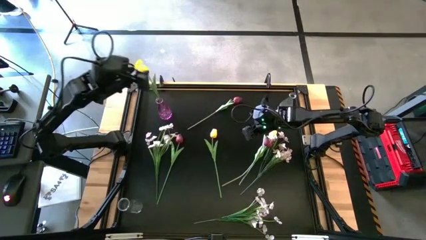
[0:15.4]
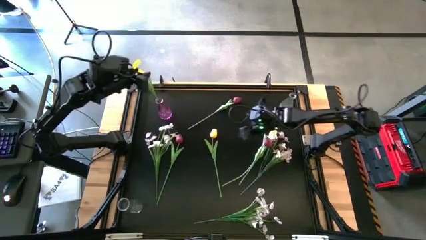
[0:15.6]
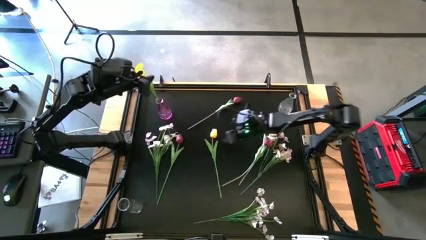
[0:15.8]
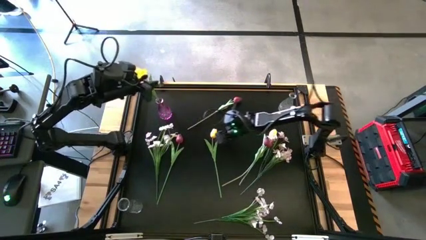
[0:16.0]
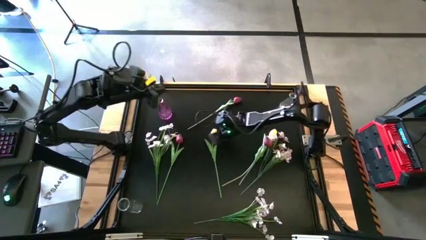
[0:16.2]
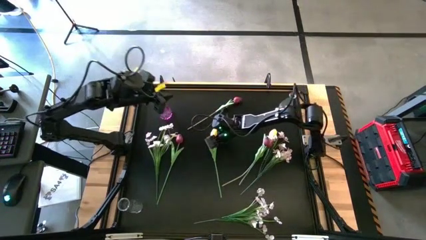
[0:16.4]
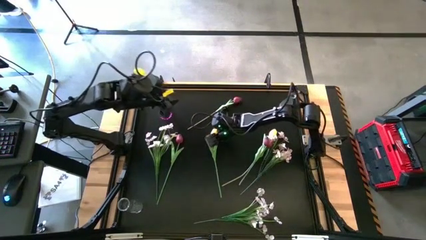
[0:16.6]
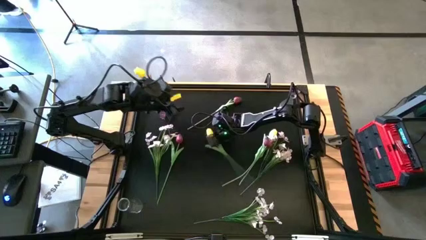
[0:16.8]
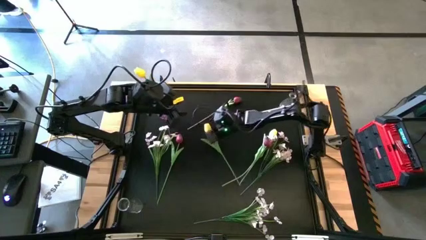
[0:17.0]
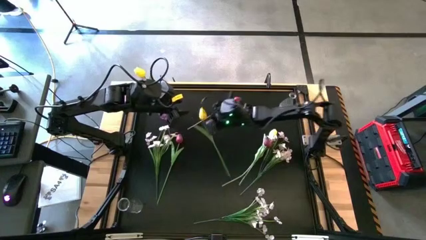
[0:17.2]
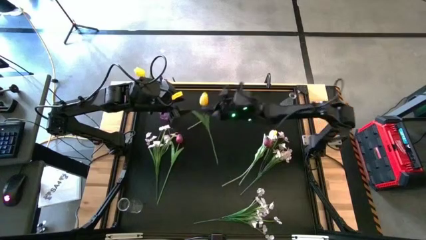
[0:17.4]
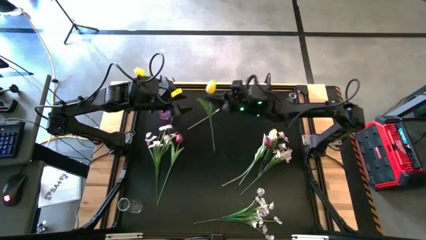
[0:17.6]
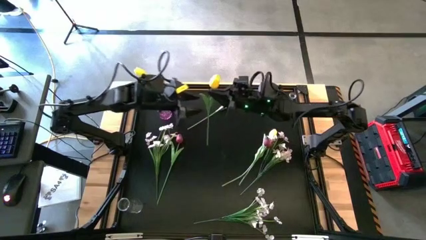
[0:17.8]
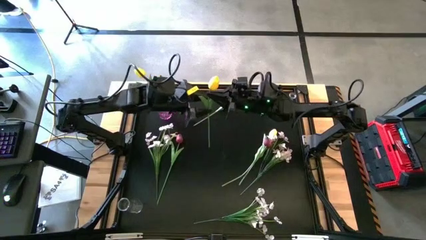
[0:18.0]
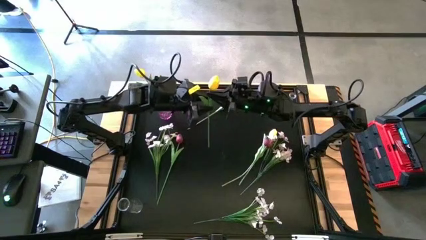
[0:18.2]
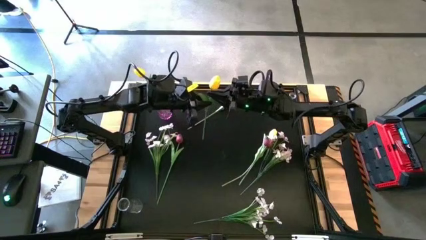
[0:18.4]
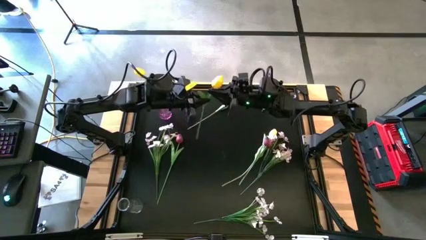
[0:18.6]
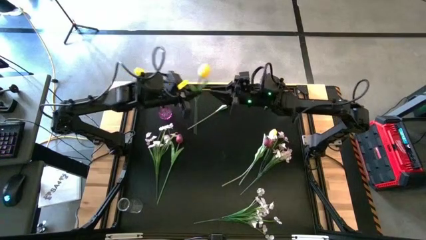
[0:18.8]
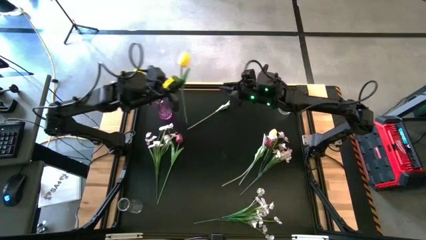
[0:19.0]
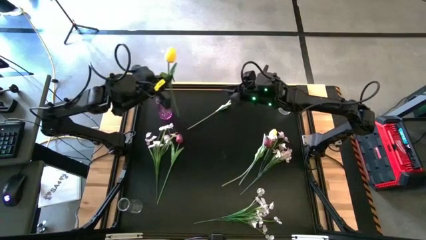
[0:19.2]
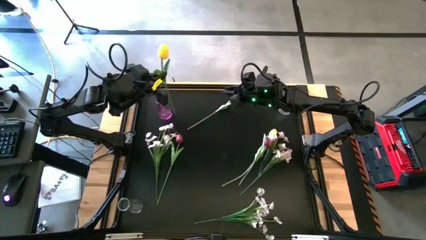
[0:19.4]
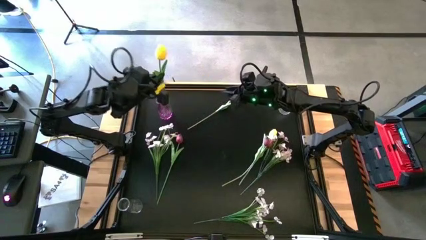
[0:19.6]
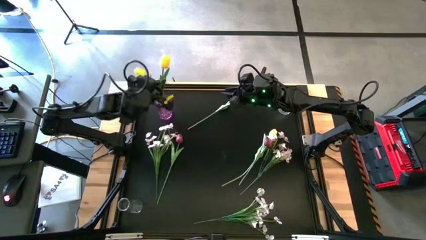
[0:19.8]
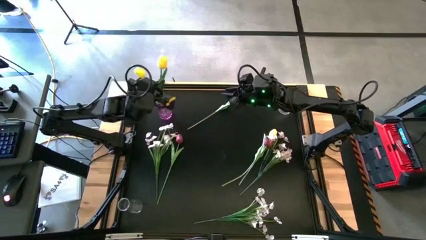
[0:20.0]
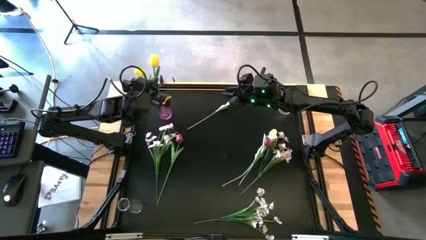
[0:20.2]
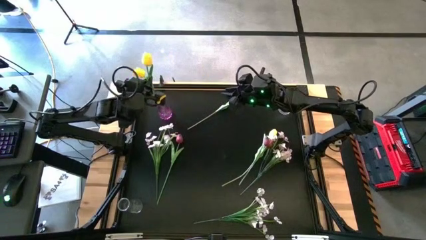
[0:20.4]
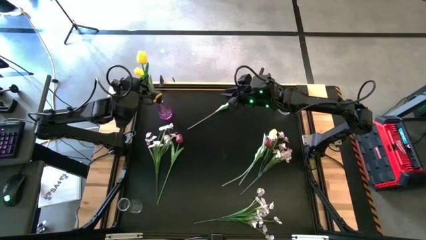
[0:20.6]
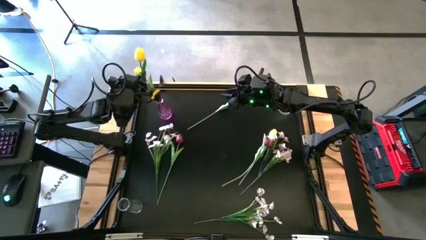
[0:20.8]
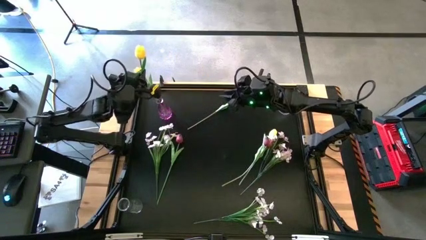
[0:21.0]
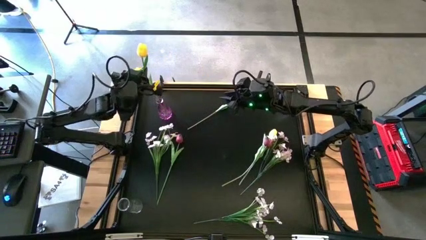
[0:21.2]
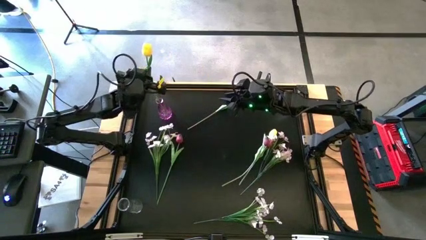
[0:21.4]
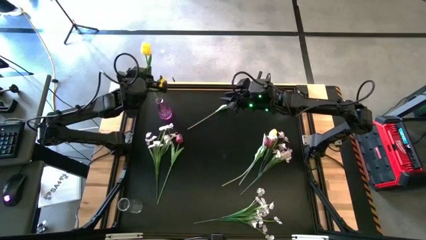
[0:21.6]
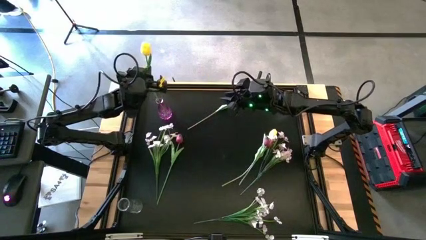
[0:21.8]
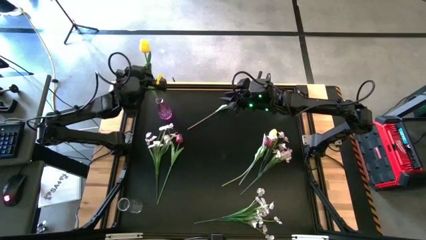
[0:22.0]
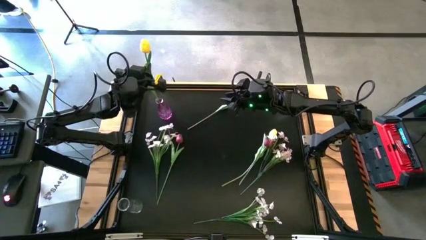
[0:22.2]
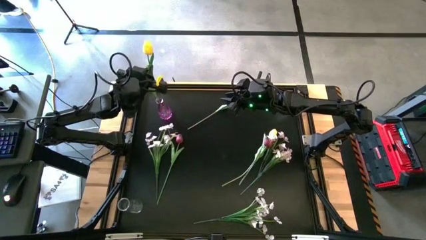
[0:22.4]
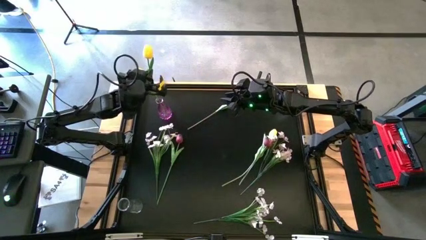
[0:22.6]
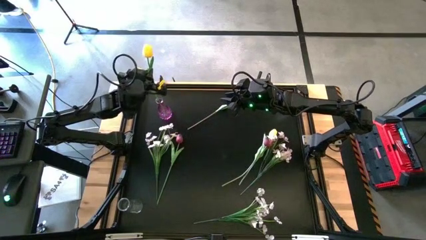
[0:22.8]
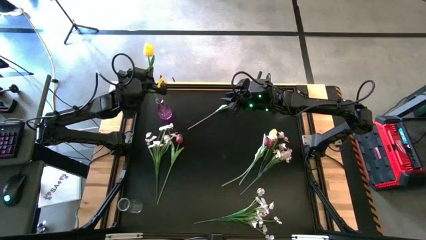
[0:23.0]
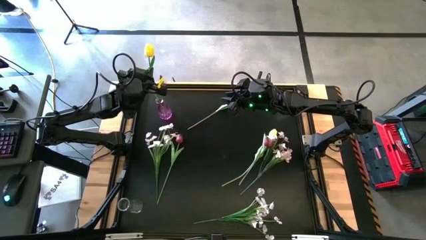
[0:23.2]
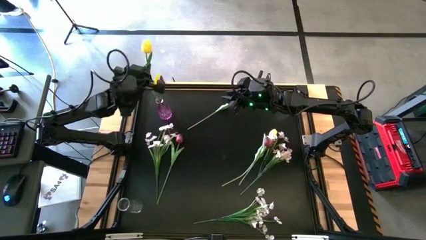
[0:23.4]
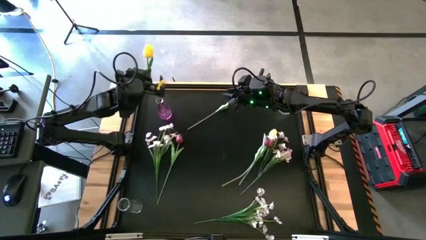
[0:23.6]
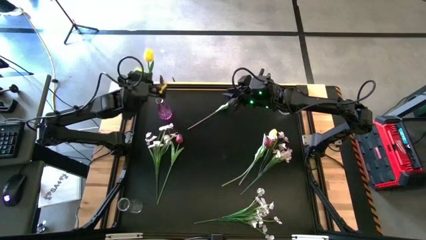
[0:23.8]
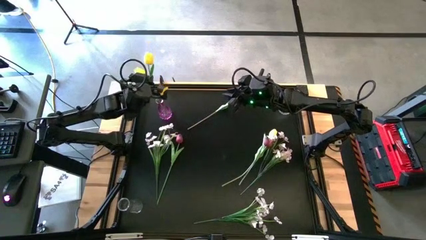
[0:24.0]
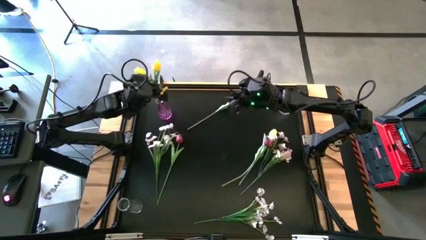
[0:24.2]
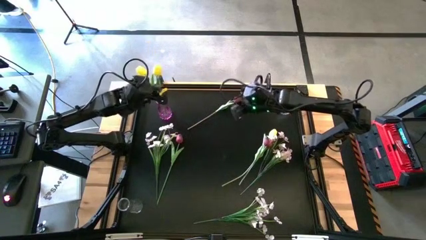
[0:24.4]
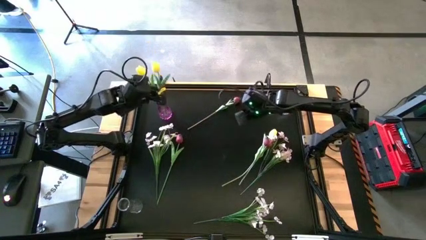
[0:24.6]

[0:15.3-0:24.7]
Task: Sort flowers into vase by color
Put the left yellow flower into the violet vase

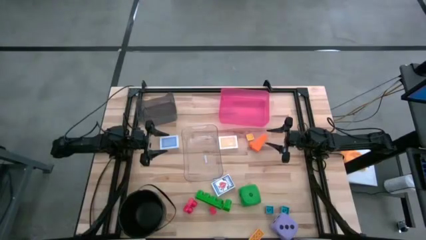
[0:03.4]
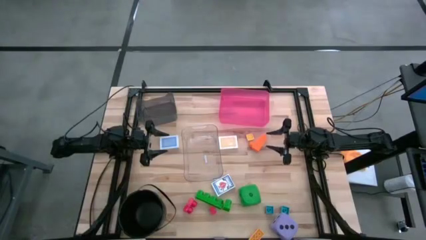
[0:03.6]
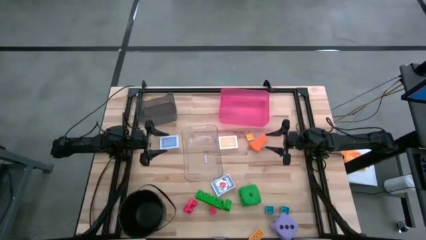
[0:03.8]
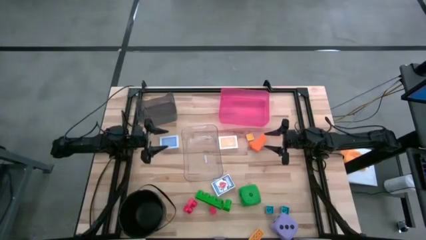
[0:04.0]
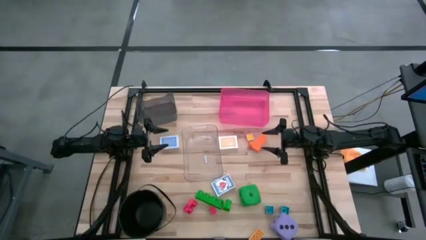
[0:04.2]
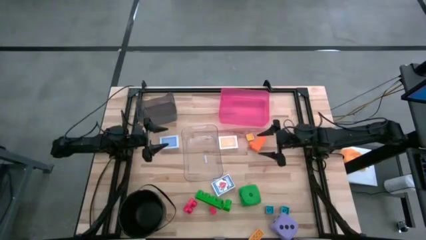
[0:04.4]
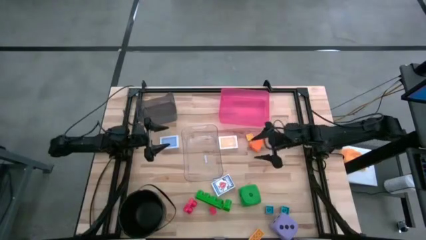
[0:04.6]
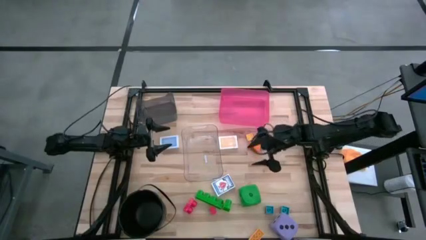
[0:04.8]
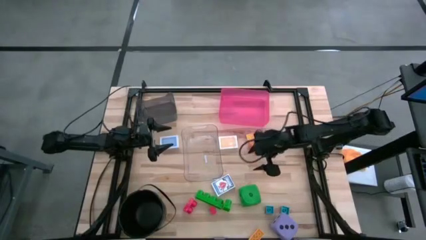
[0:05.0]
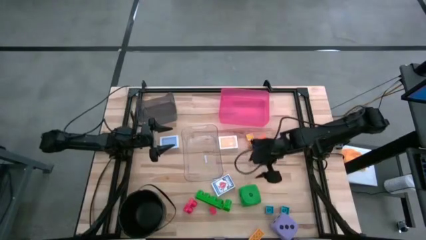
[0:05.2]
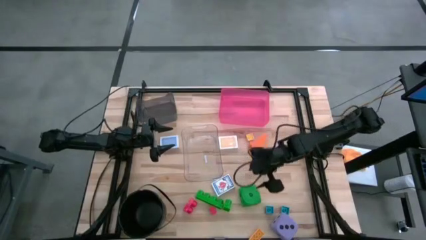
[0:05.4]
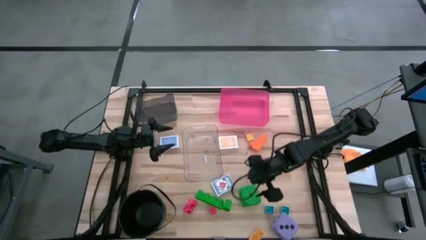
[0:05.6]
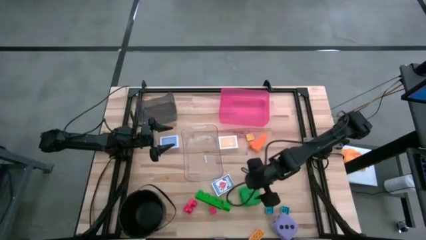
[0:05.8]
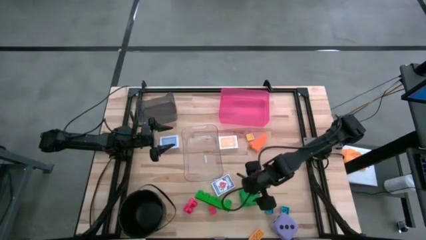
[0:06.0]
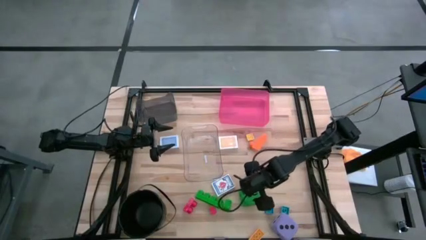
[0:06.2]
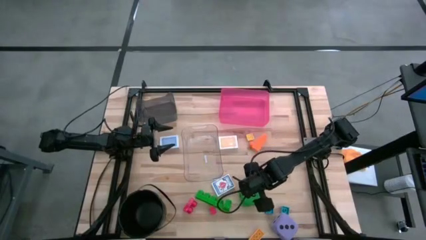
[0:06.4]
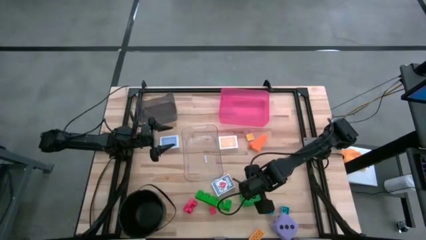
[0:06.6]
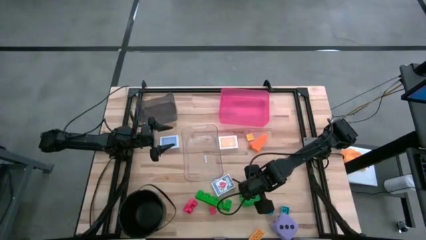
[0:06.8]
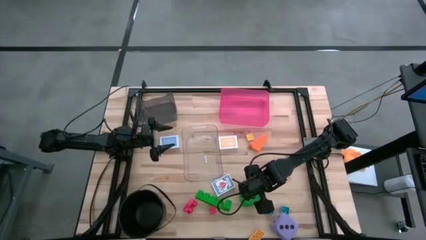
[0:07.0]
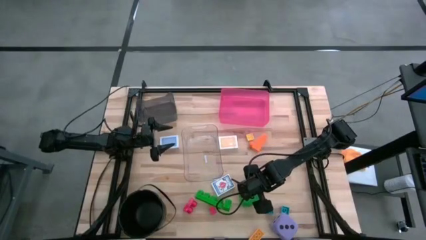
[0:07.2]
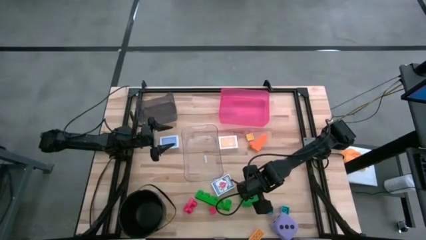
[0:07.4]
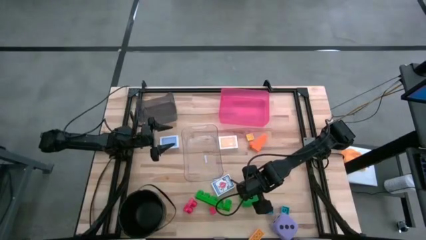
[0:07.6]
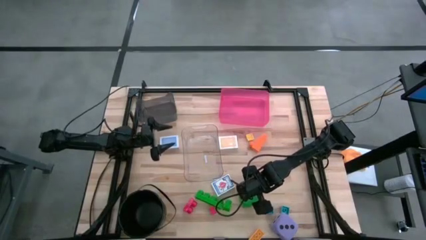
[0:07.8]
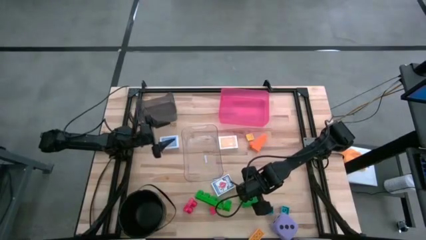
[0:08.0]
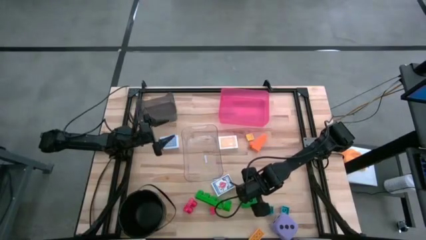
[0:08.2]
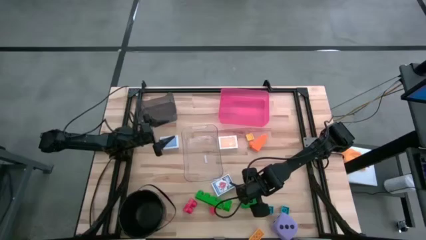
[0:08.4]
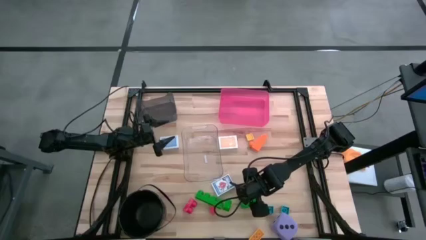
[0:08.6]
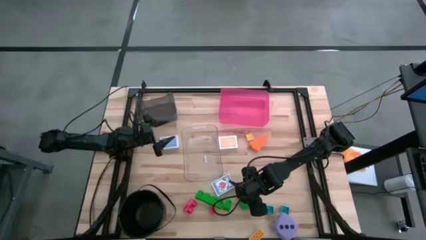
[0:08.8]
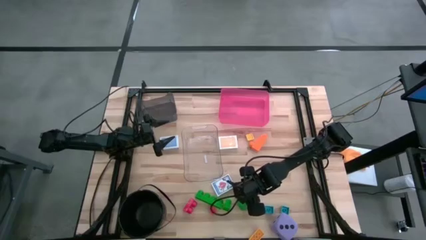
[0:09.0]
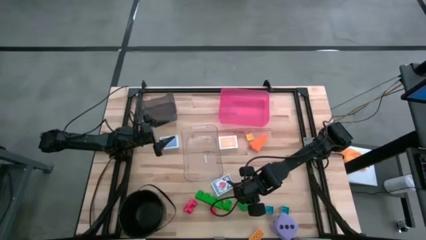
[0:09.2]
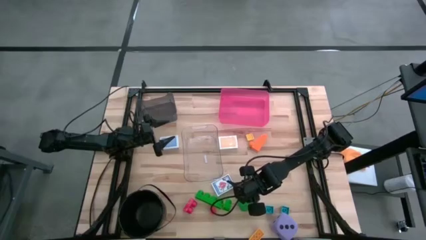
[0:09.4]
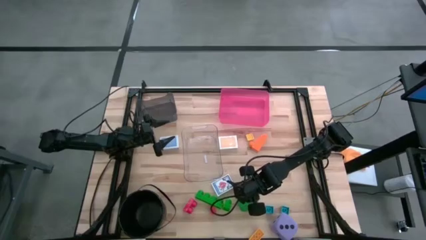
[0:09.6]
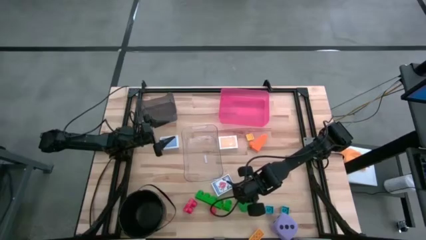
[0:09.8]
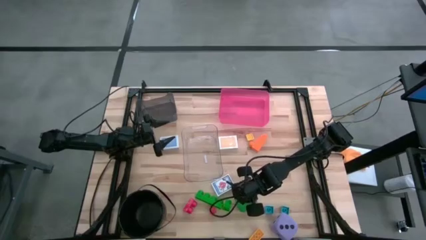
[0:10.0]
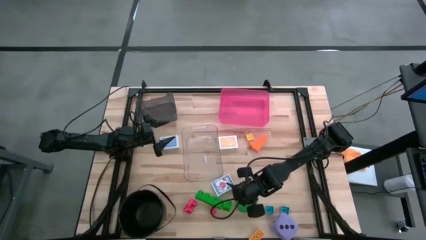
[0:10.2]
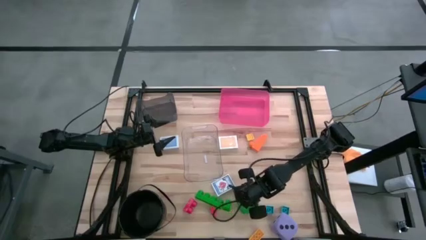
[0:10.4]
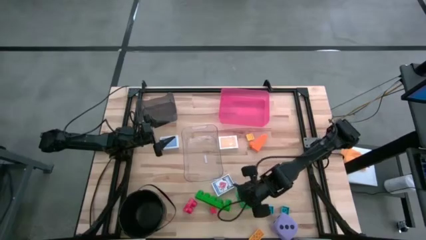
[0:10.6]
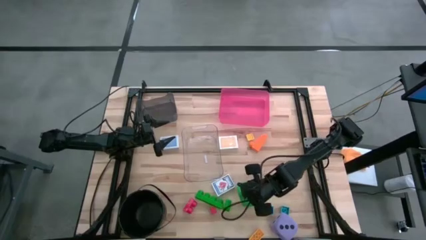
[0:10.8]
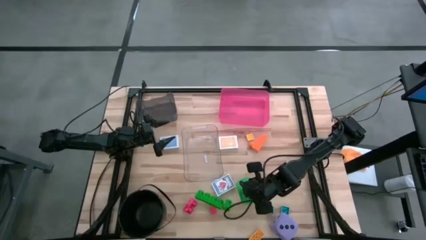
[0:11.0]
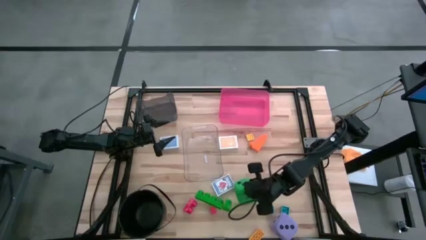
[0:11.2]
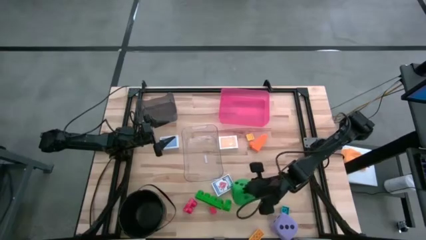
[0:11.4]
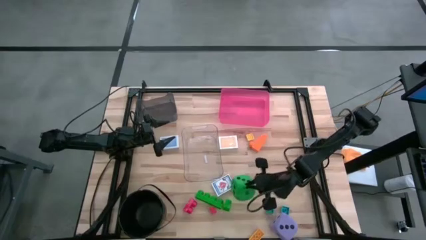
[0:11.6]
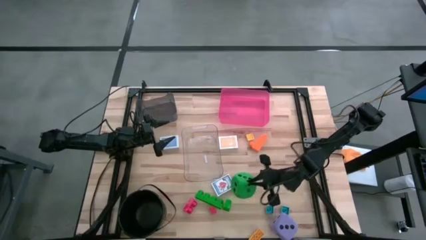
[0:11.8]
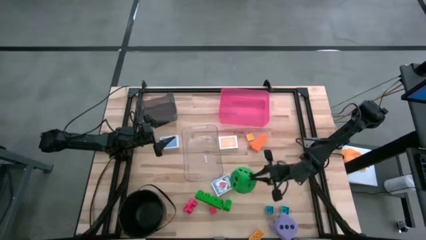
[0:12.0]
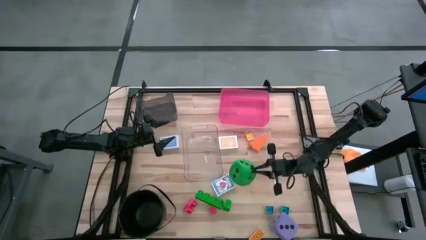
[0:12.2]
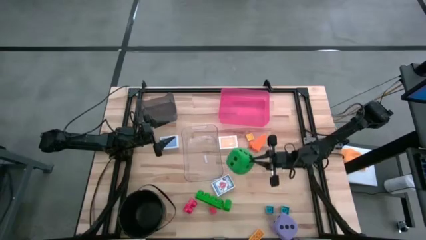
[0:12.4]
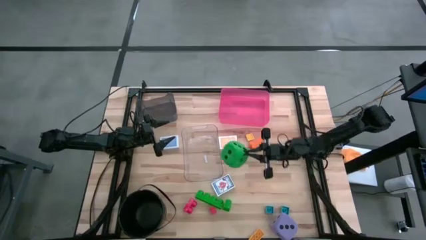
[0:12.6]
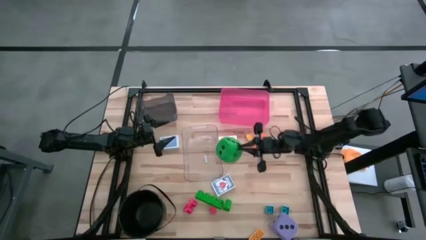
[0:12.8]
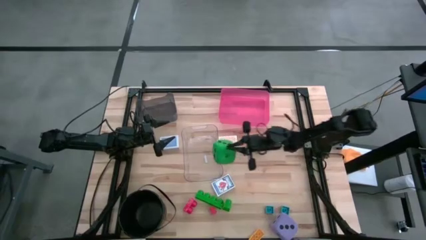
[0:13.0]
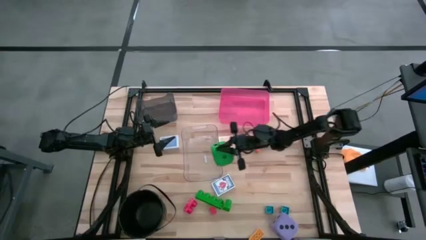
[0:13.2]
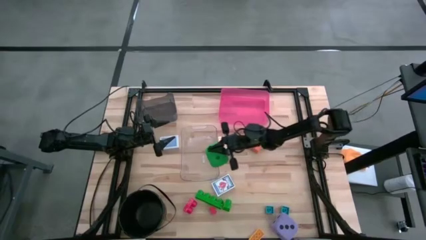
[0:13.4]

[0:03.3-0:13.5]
Task: Pick & Place Toys
Put the green dice into the transparent bin
